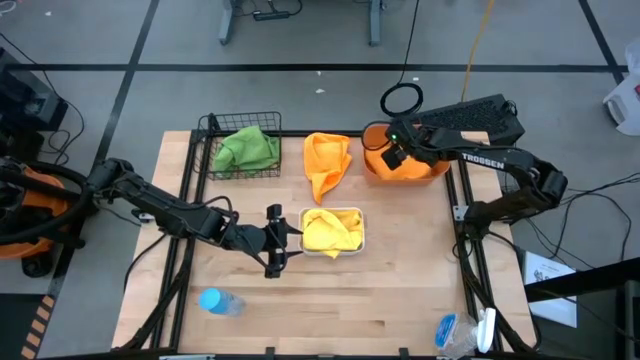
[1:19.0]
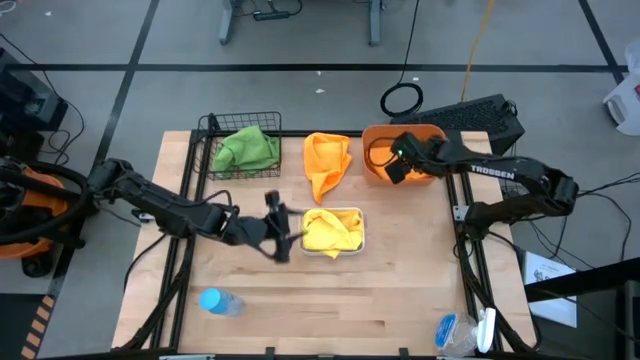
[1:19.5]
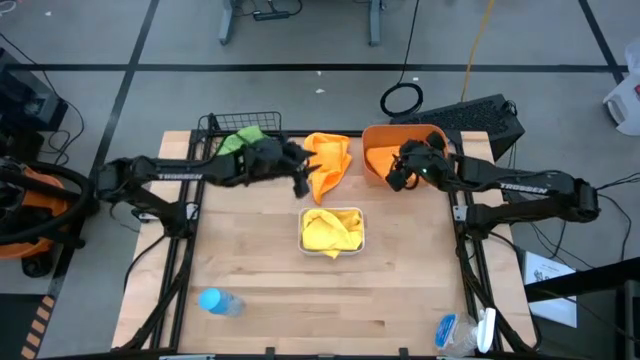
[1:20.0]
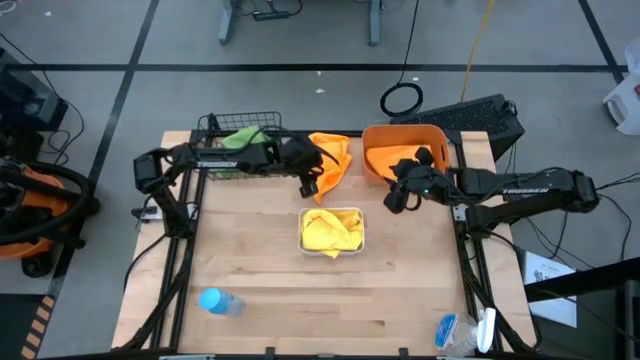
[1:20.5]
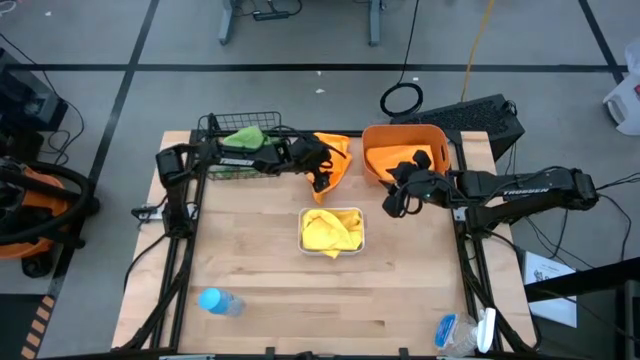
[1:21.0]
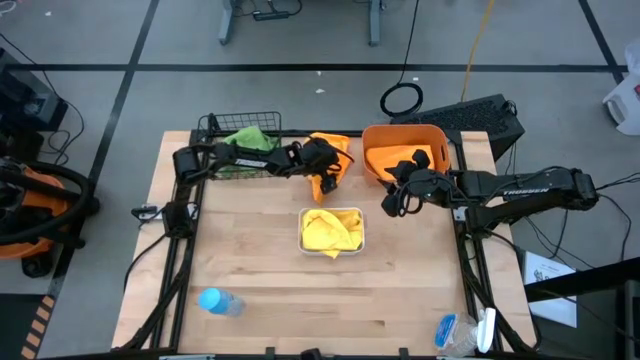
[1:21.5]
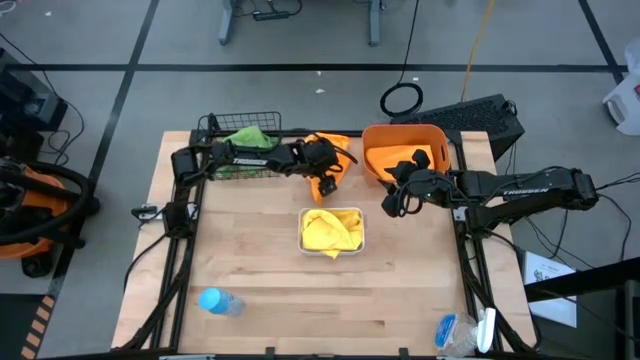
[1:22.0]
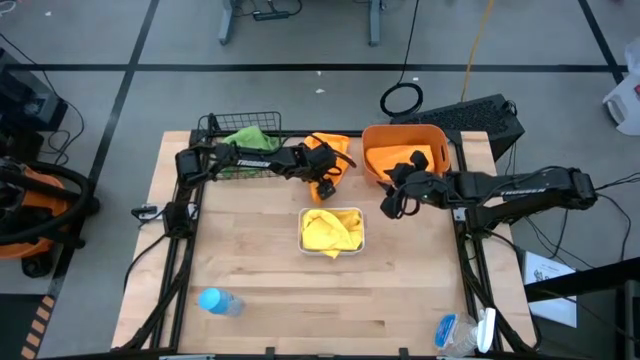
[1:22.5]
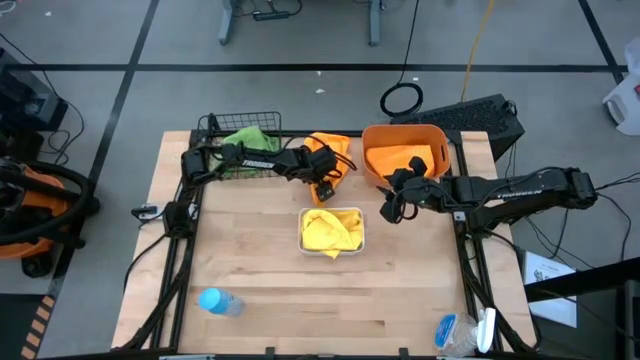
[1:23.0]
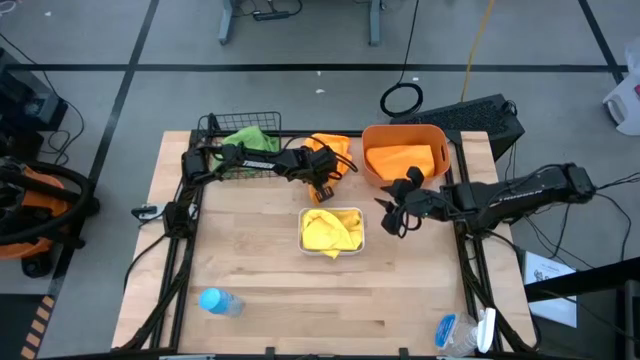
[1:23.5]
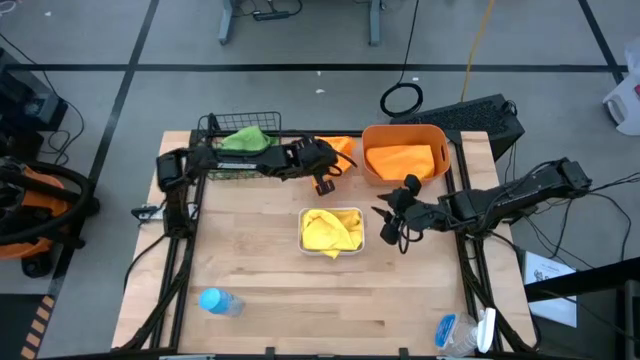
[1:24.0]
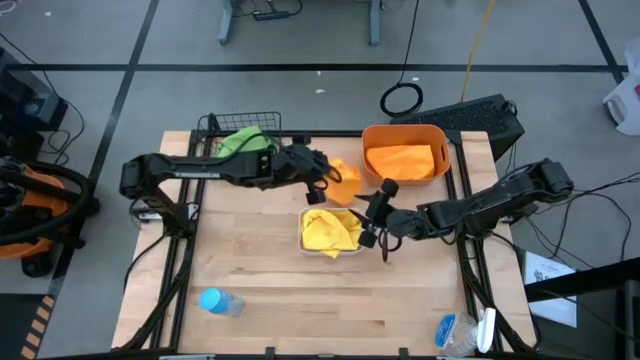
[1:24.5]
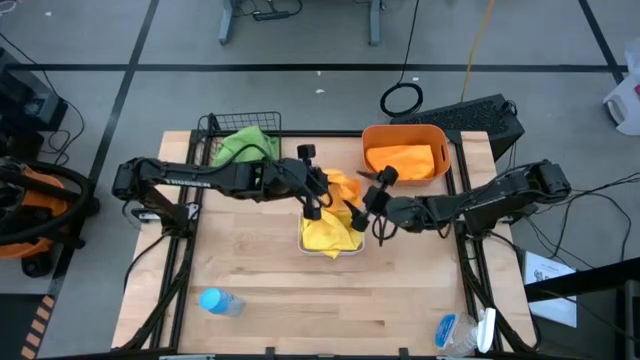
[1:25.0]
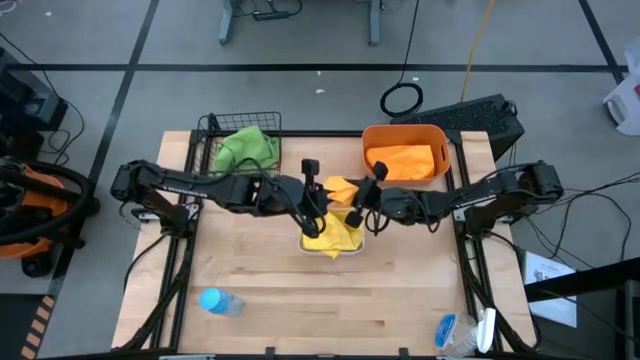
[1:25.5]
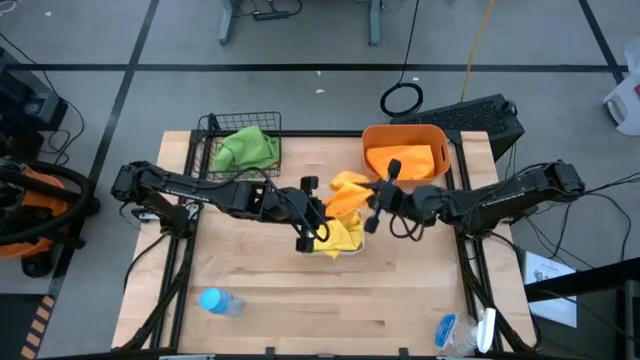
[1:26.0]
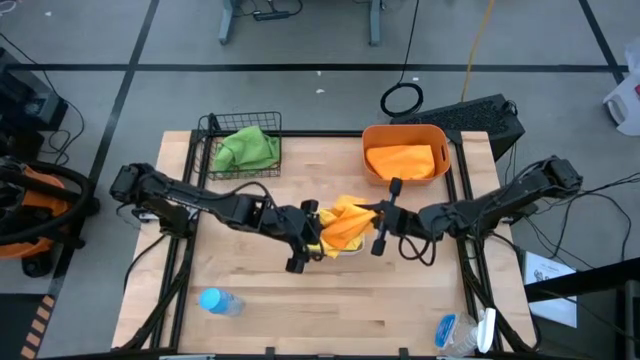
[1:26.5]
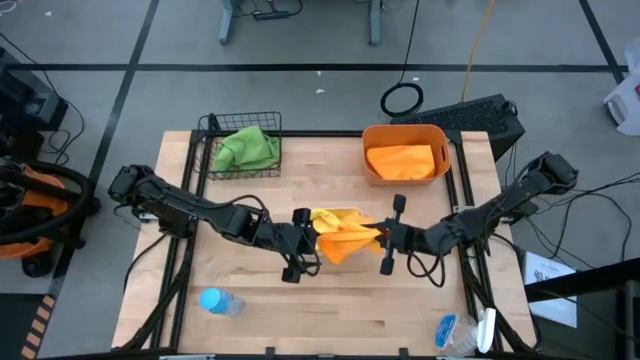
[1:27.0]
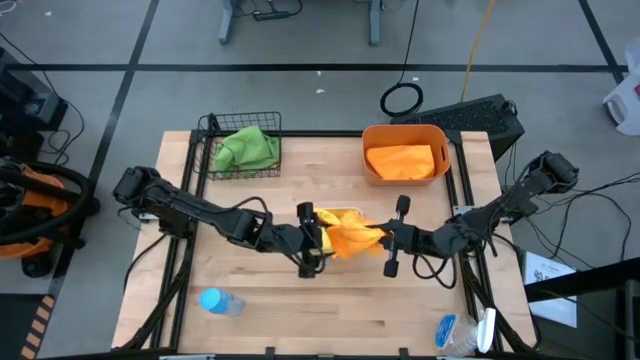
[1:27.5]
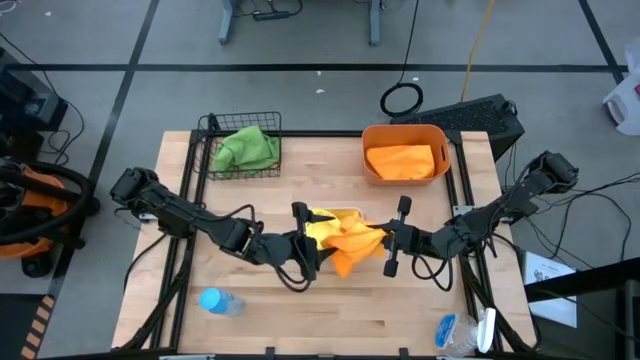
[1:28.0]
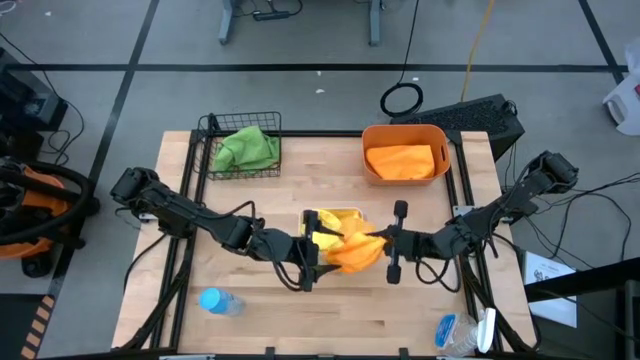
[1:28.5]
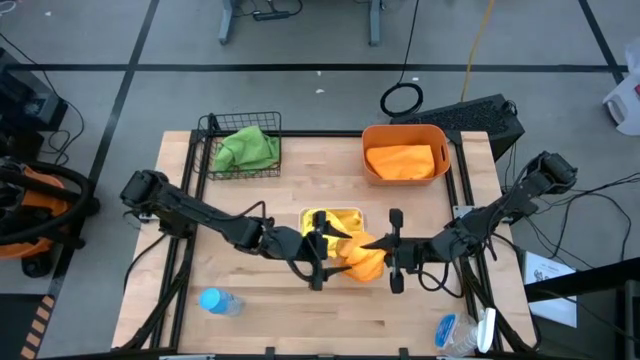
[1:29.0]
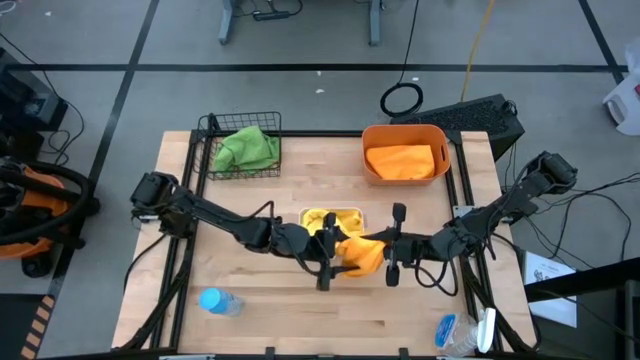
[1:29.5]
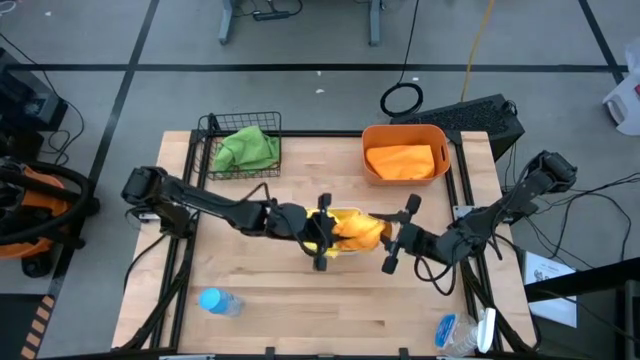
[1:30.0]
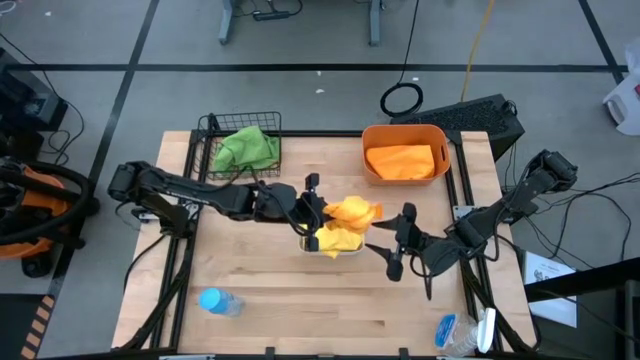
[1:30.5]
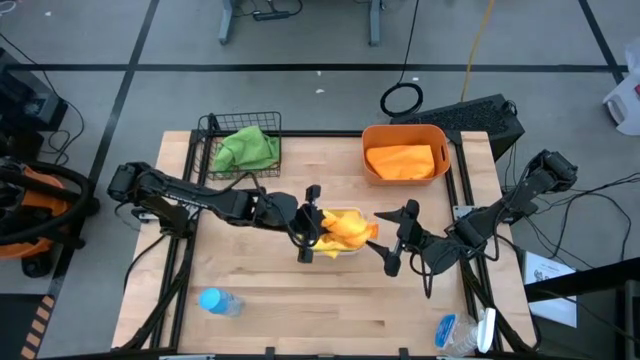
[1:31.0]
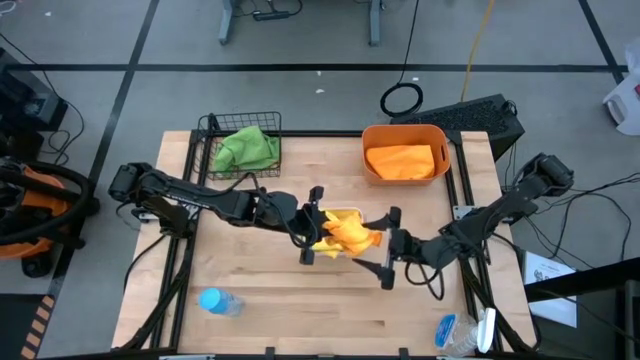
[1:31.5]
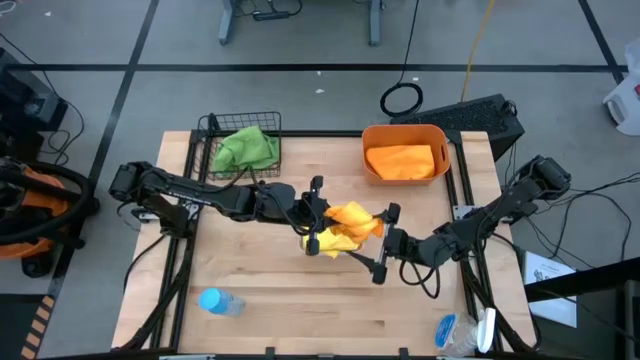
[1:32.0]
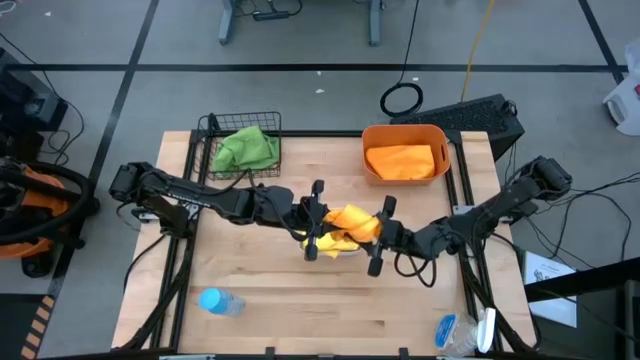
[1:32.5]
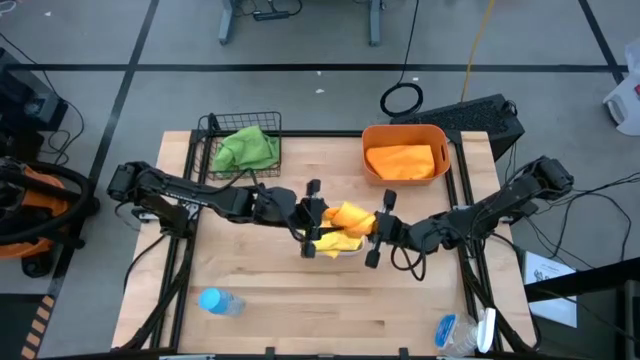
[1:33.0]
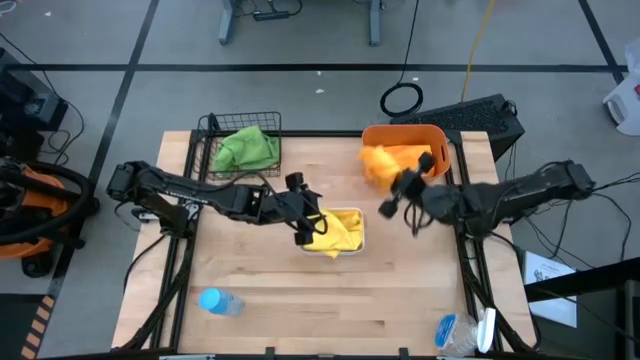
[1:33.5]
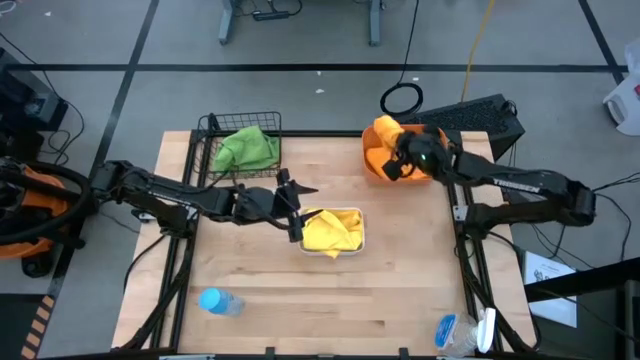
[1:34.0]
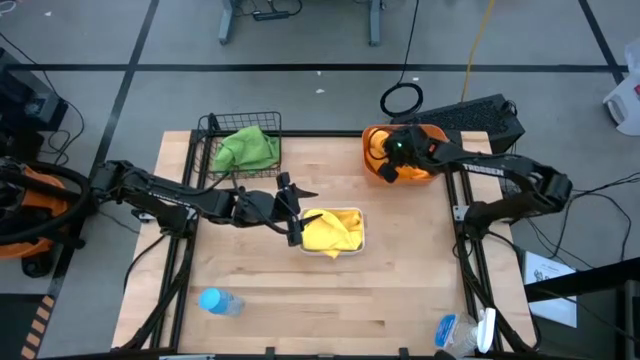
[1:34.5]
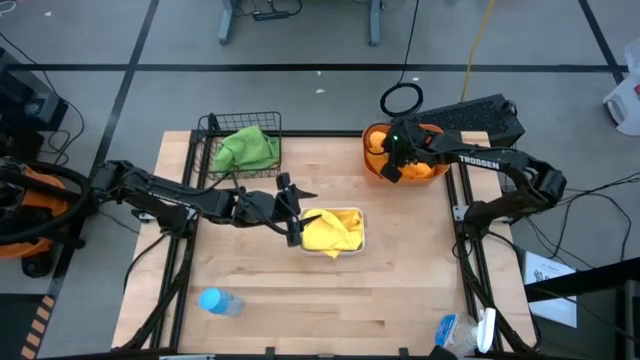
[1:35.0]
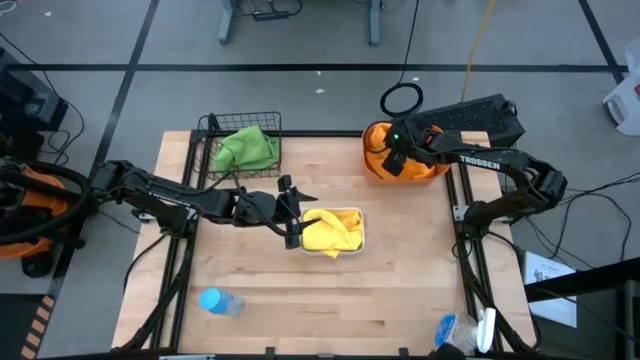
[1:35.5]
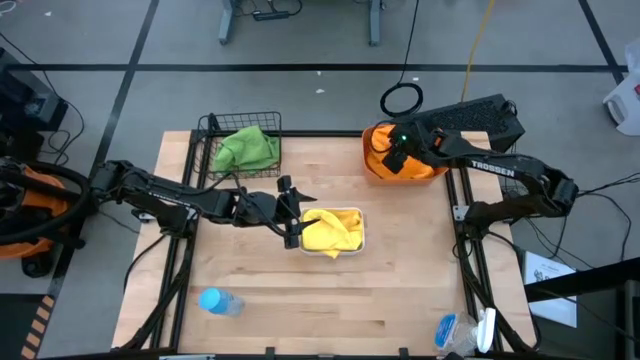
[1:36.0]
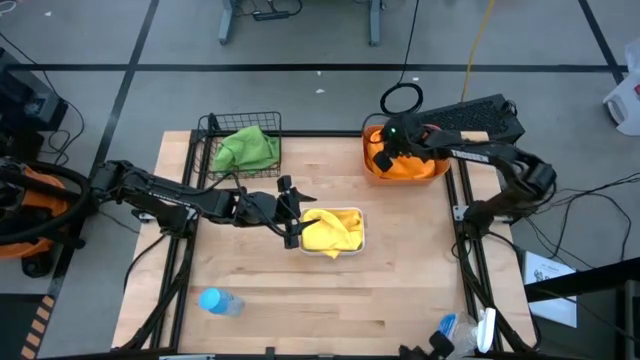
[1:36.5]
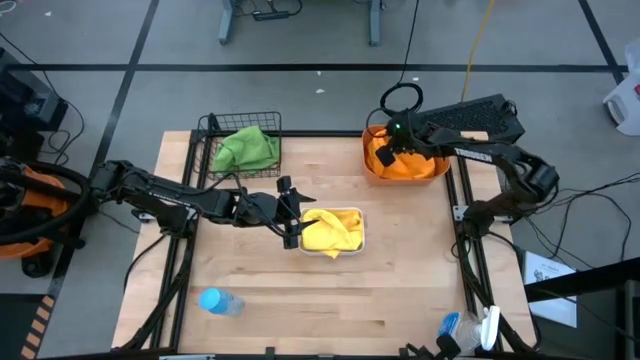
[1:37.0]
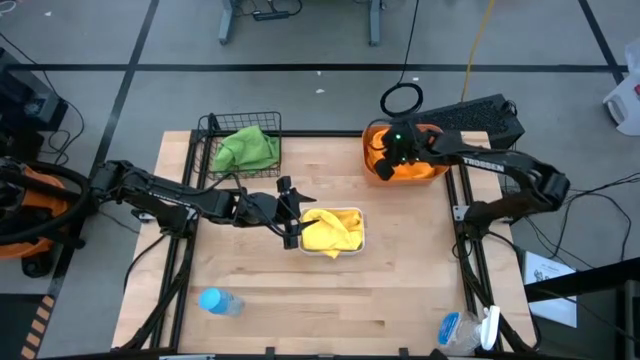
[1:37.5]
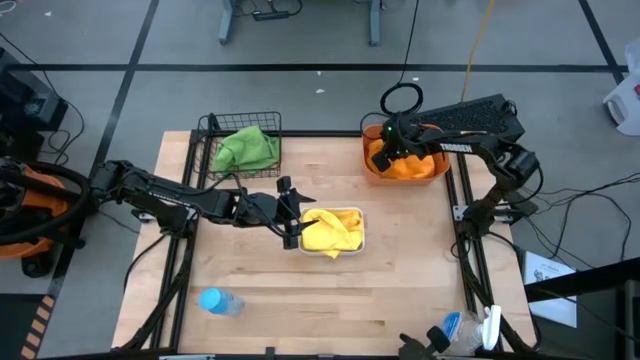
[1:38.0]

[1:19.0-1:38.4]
Task: Sort microfiber towel by color & place in baskets
Put the orange microfiber towel into the orange bin

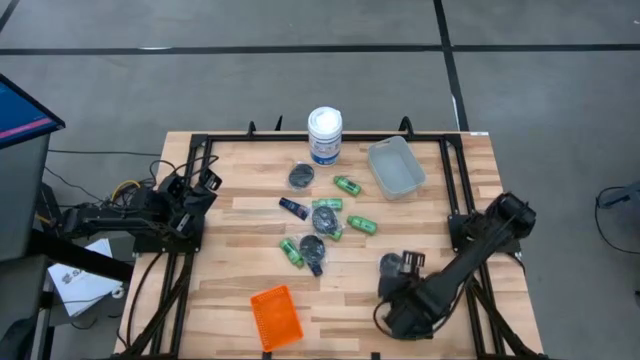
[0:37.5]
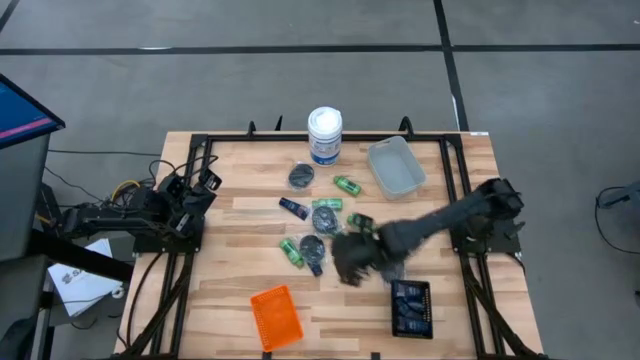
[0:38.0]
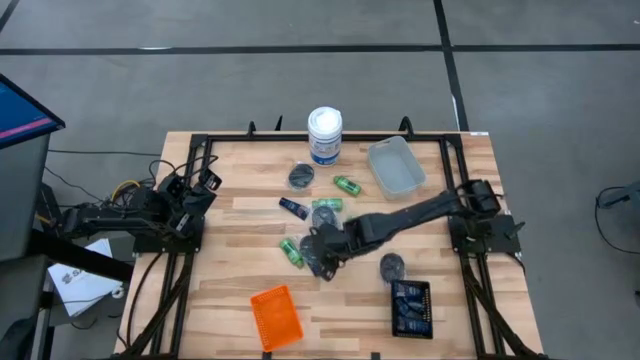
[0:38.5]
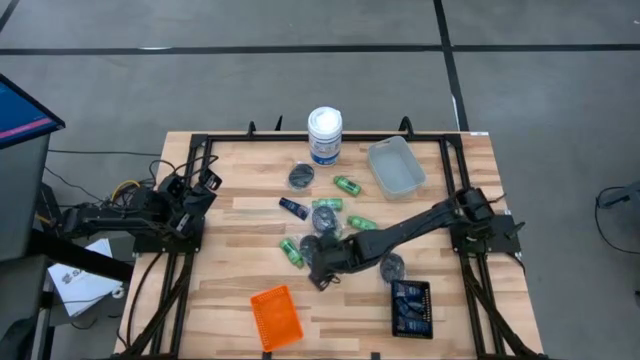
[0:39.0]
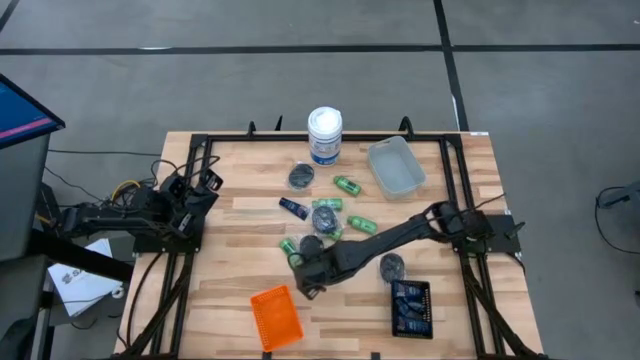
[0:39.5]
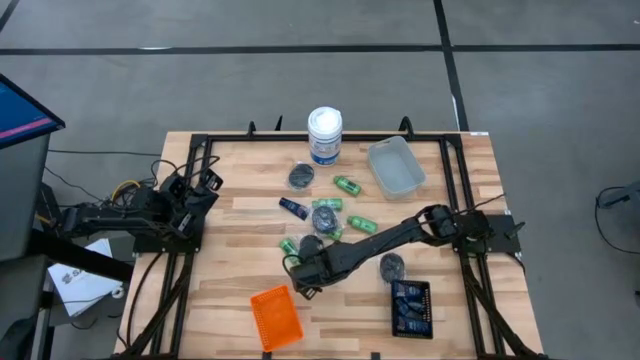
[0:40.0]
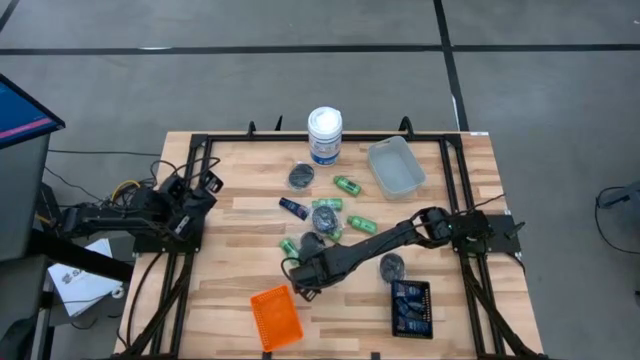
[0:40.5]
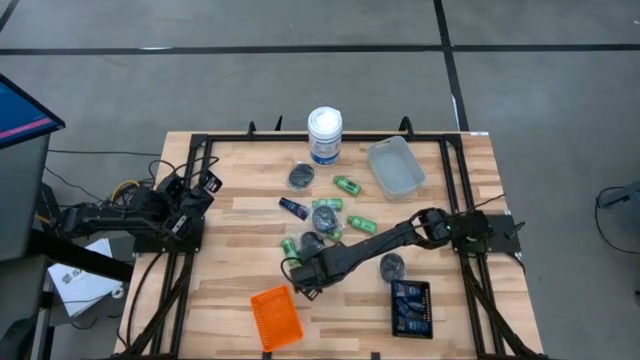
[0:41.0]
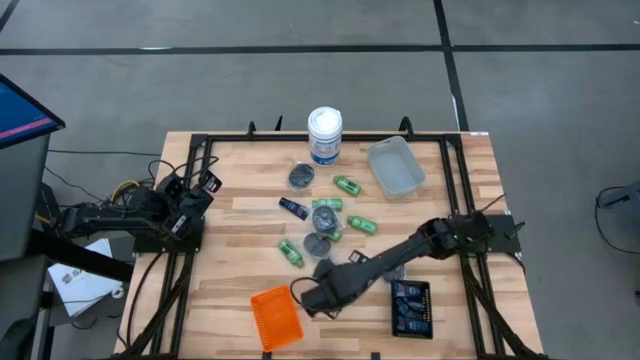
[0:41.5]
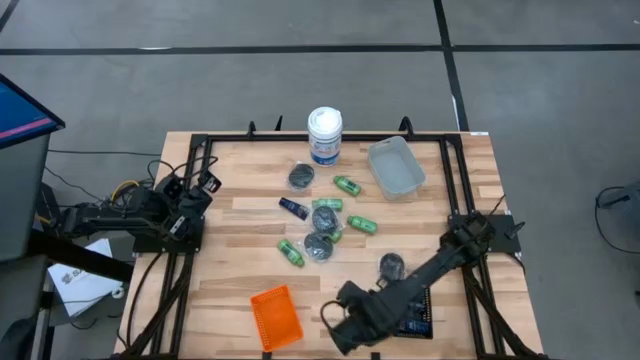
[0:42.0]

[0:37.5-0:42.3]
Task: Pick & Place Travel size toiletries
Put the blue shave cream into the black basket
